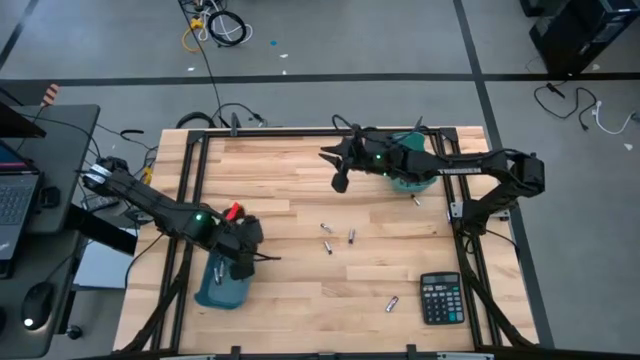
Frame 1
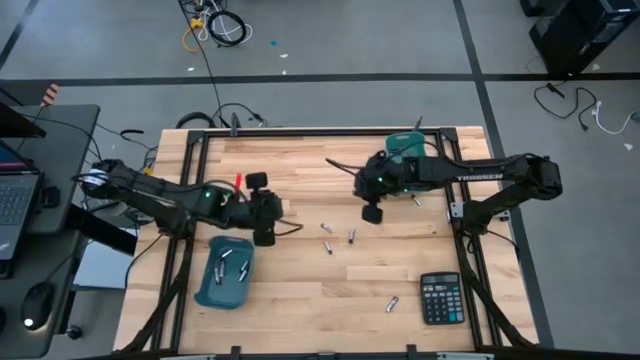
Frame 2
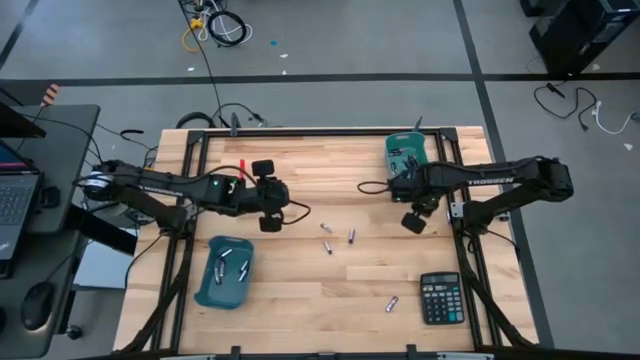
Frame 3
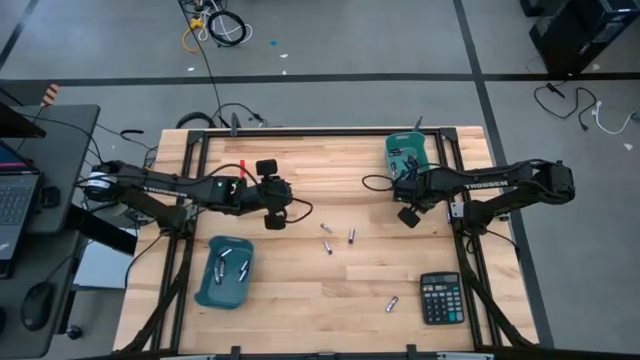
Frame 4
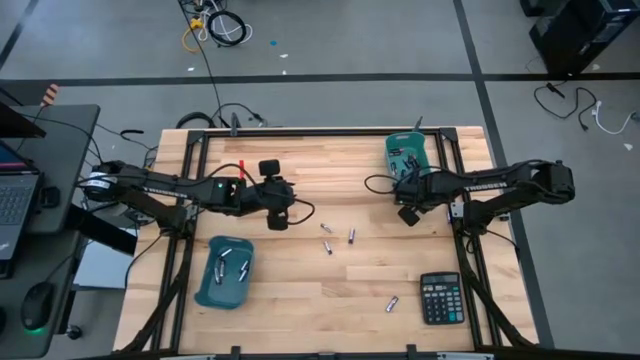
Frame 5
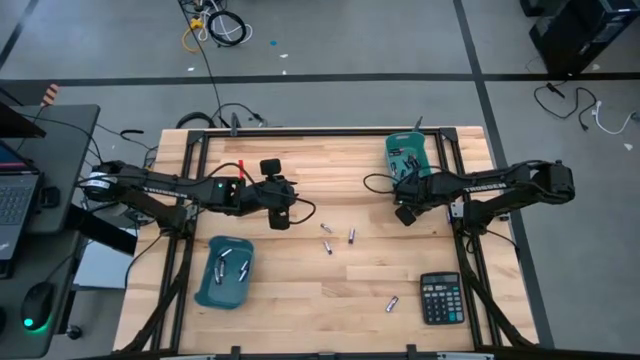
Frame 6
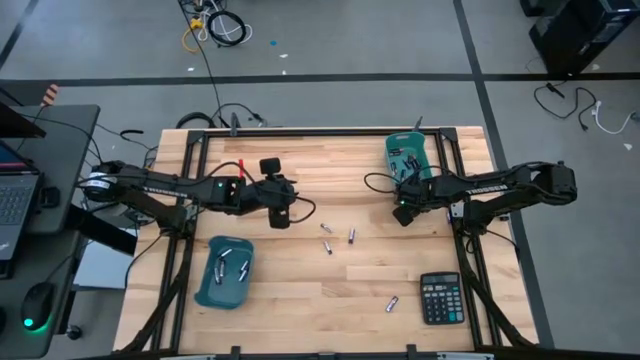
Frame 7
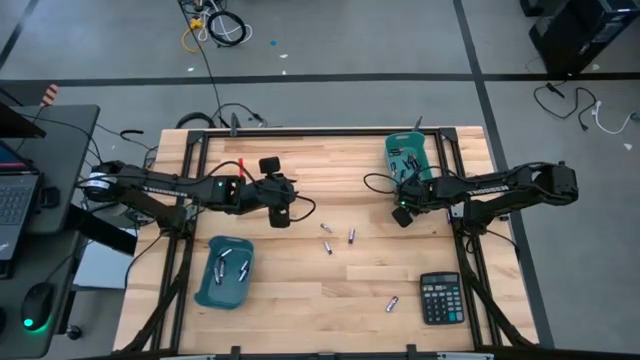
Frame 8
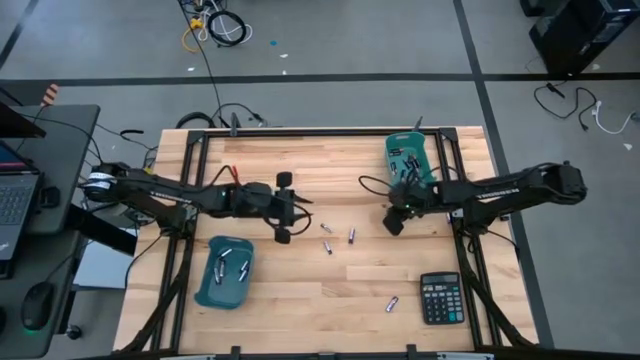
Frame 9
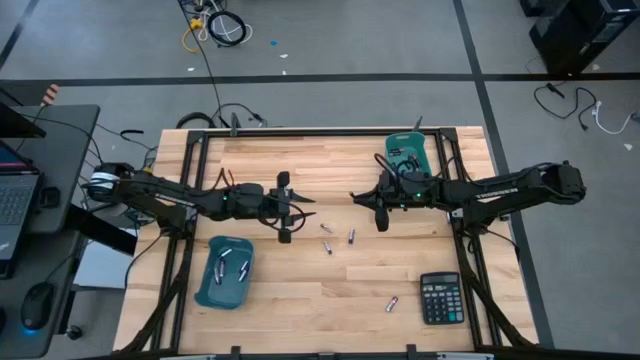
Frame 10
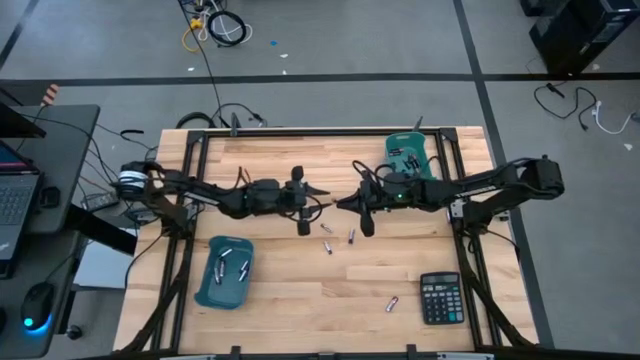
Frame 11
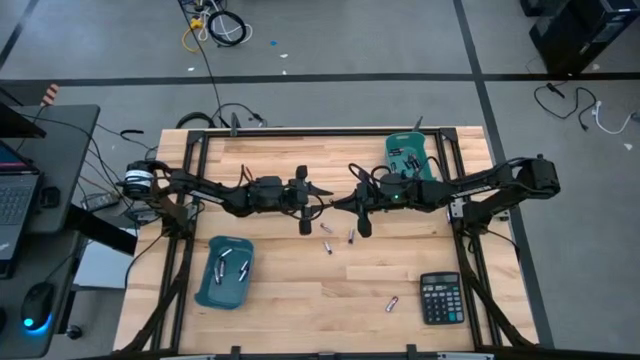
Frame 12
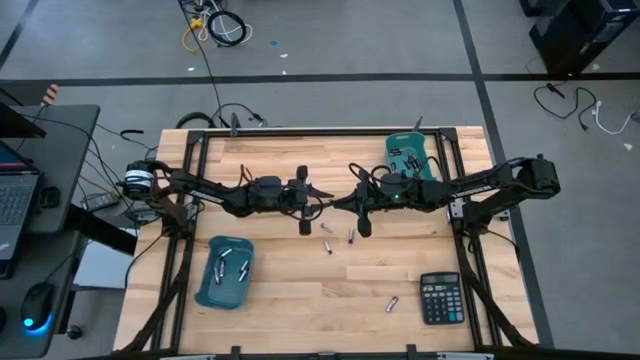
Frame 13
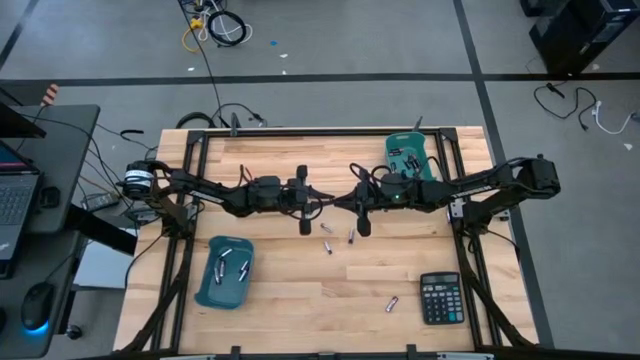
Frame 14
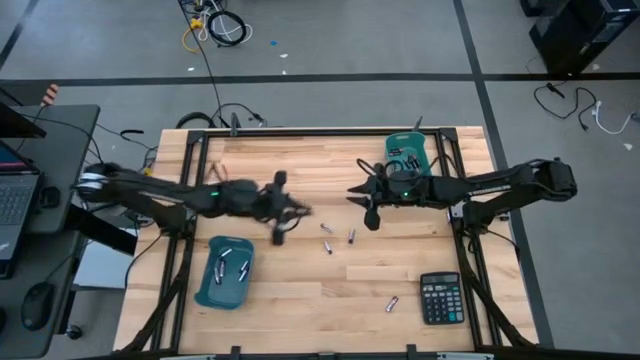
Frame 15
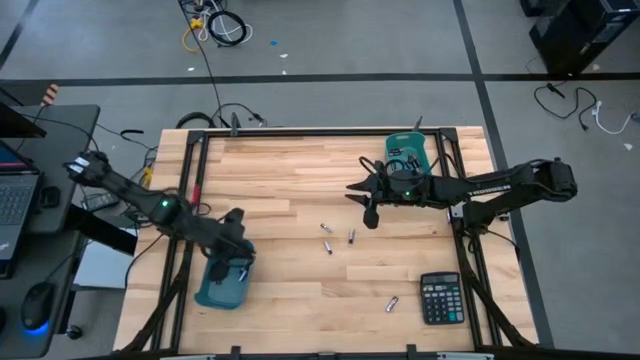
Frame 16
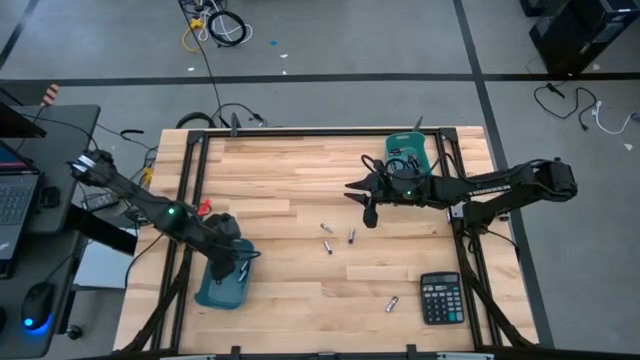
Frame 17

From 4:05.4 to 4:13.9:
Task: Sort batteries
Put the silver battery into the blue bin

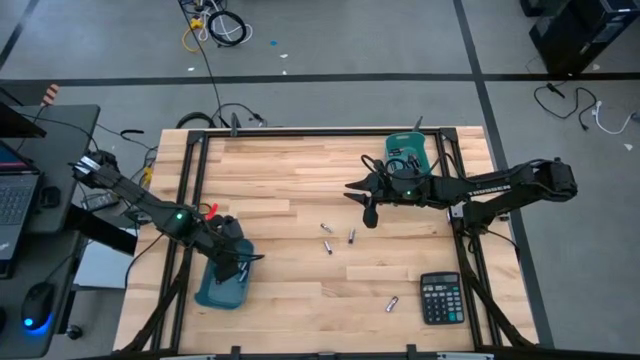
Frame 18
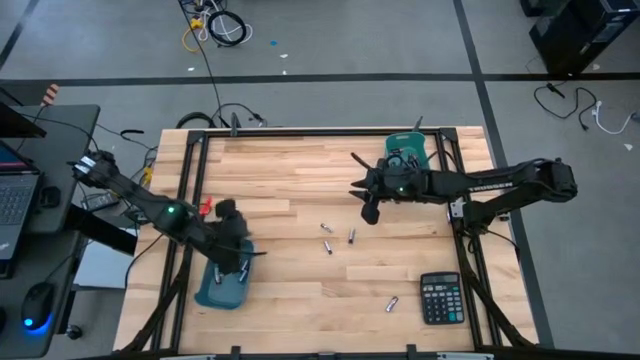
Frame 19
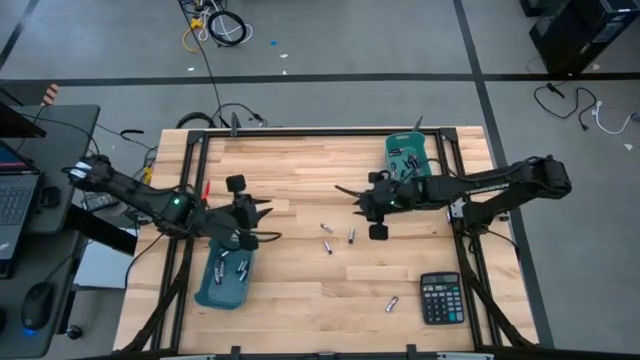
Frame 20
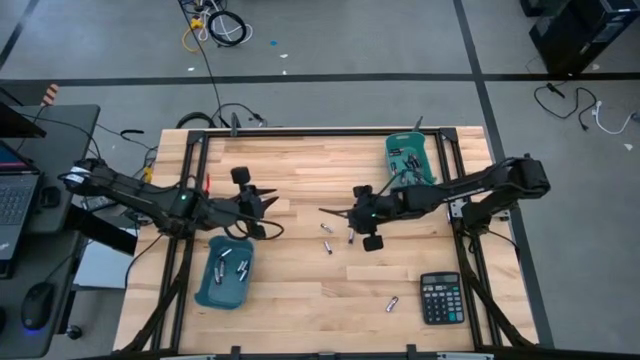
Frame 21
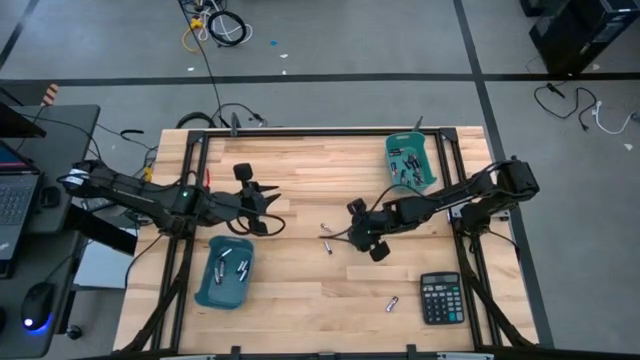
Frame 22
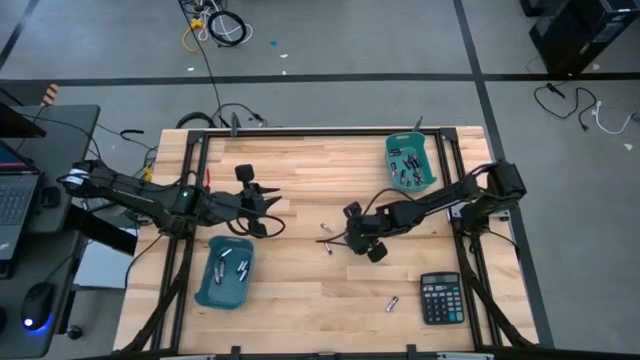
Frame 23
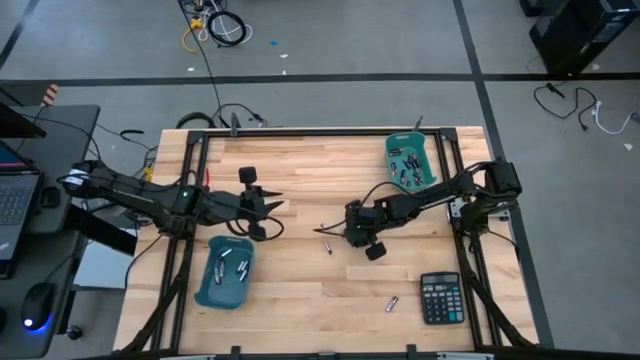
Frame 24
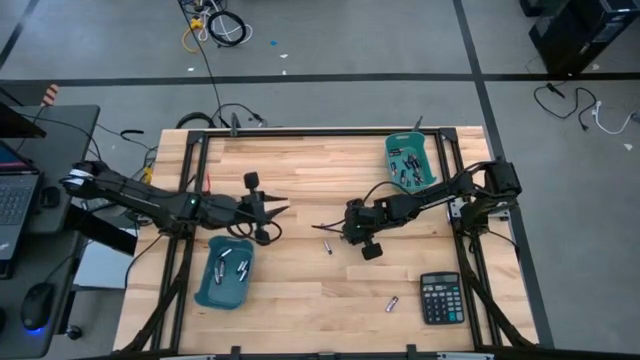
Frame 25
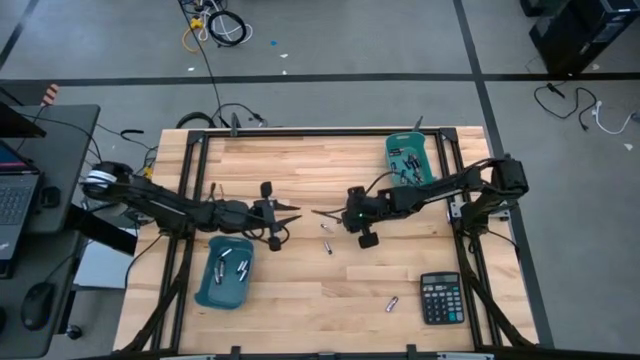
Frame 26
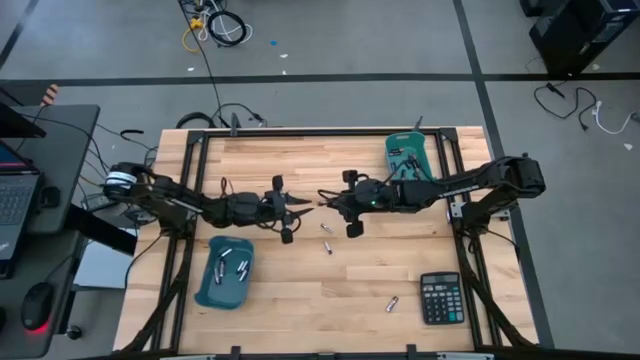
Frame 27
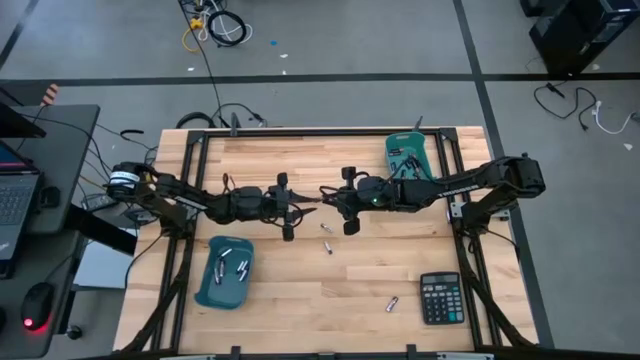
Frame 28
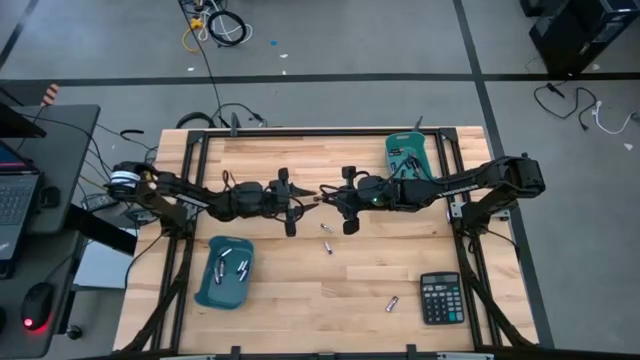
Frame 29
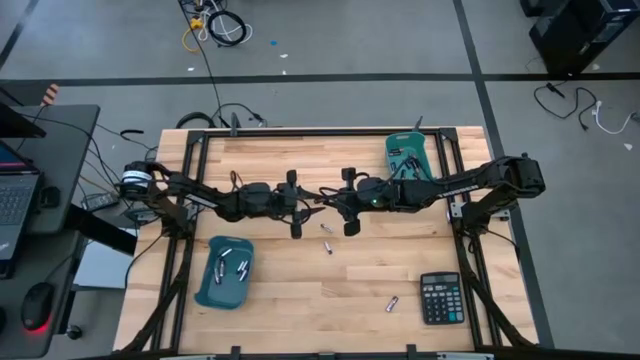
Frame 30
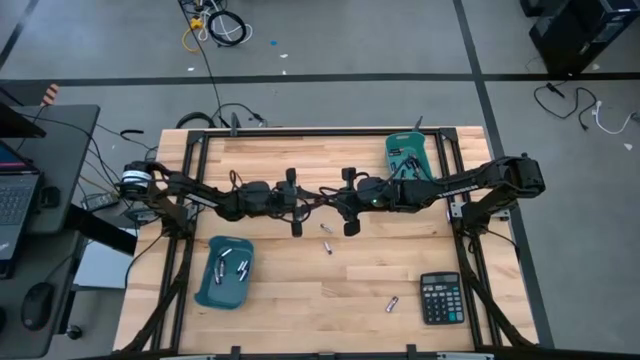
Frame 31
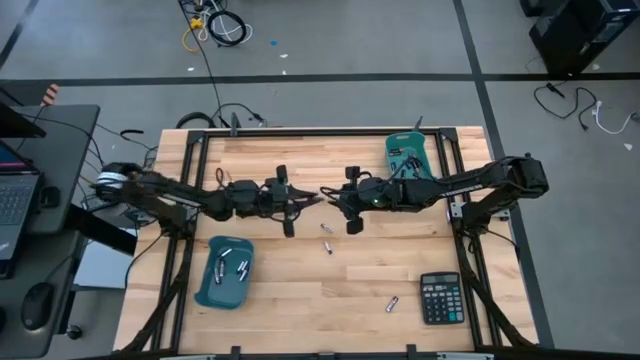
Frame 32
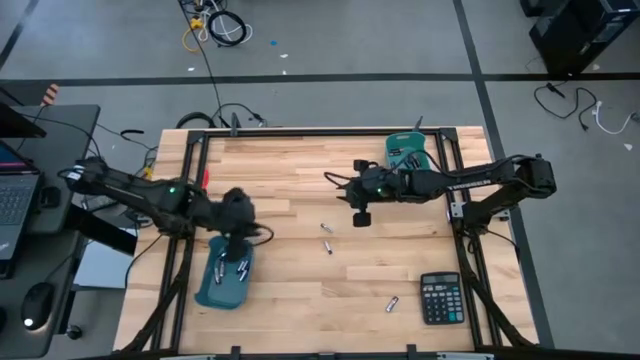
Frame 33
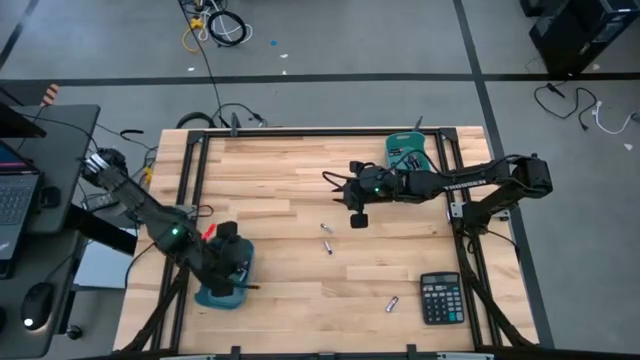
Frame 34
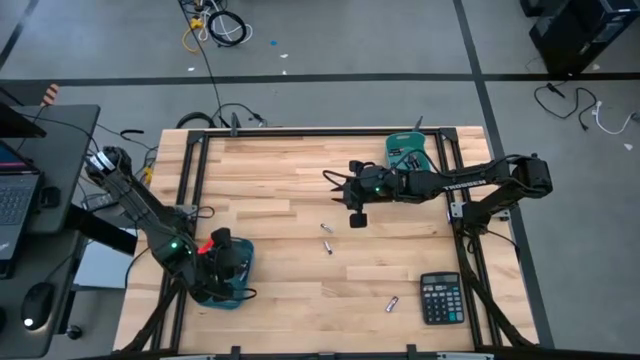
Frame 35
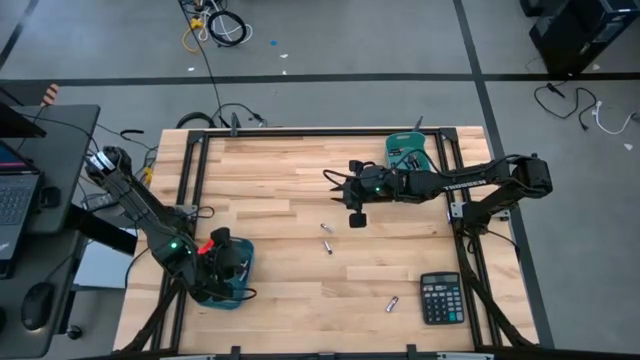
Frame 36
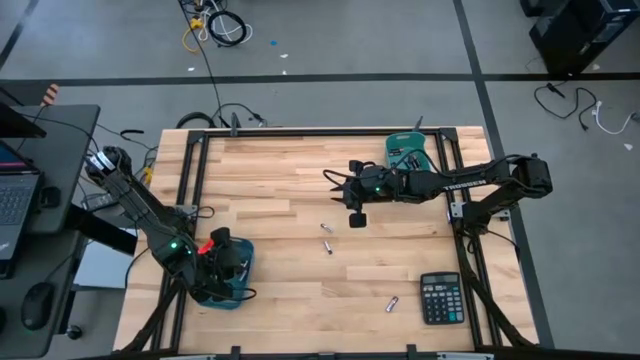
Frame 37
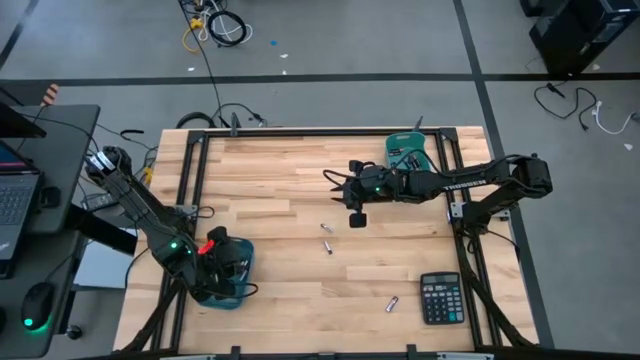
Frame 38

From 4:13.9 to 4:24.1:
Put the silver battery into the blue bin

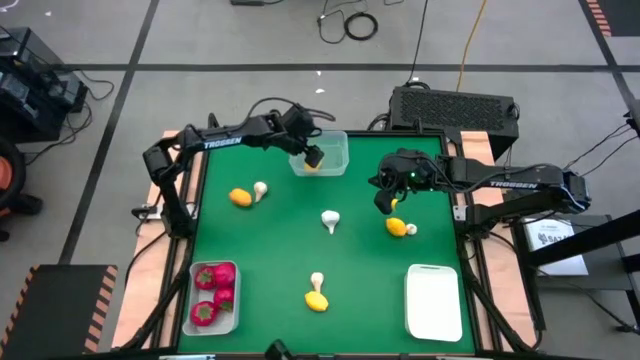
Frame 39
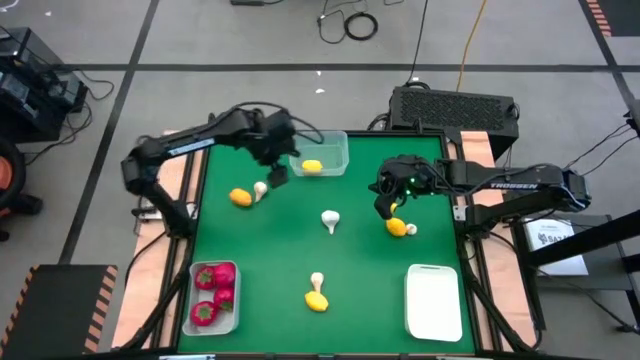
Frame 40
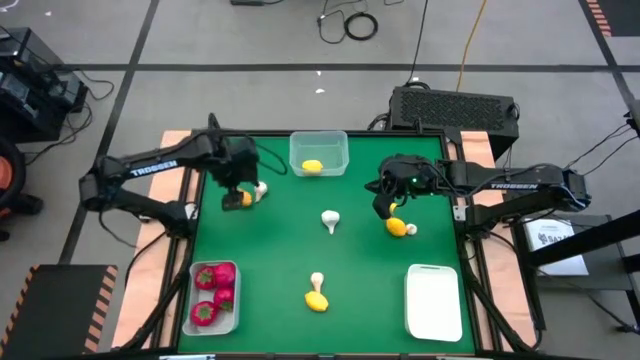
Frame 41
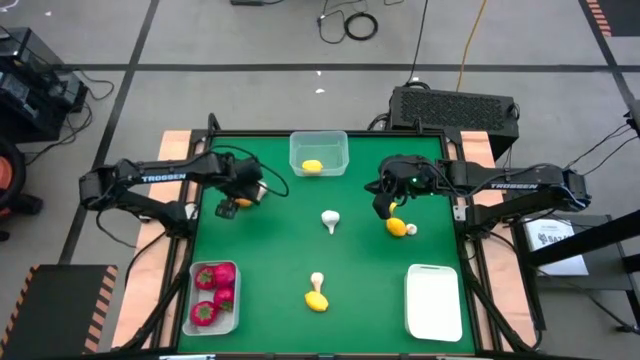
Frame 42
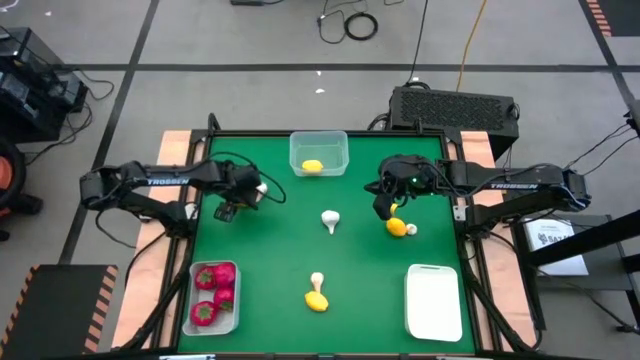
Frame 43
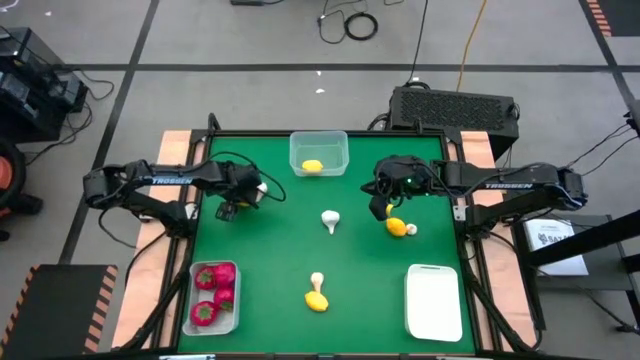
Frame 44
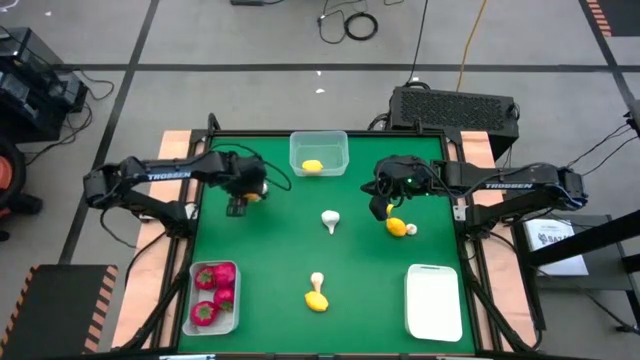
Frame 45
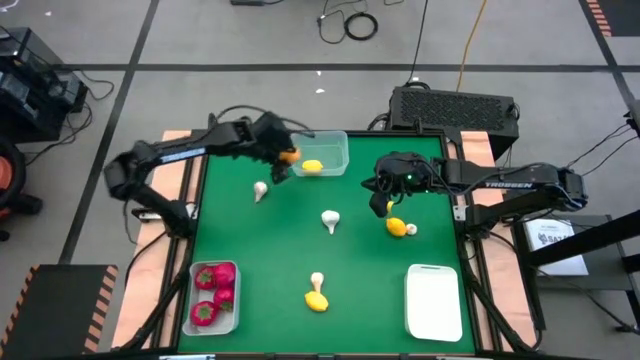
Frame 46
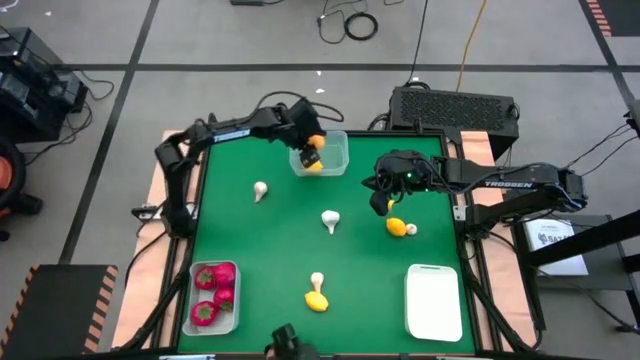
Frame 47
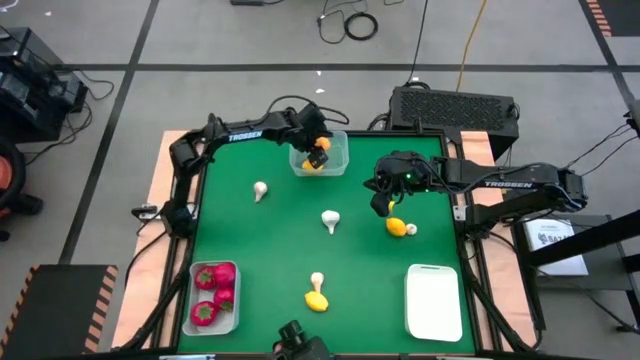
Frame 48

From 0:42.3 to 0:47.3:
Task: Sort produce into baskets
Put the lemon into the transparent bin
